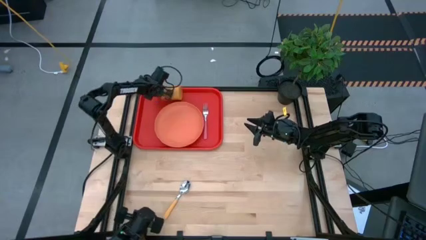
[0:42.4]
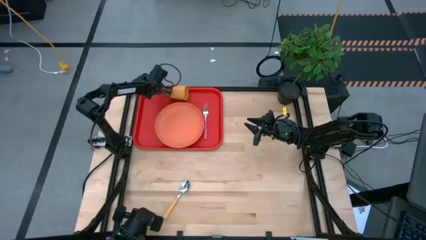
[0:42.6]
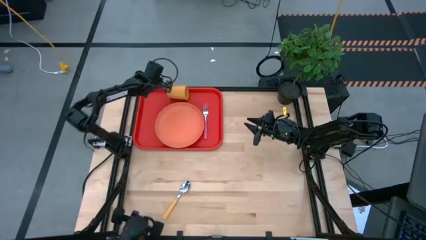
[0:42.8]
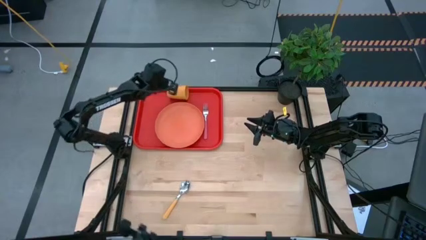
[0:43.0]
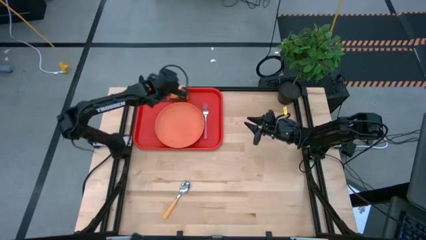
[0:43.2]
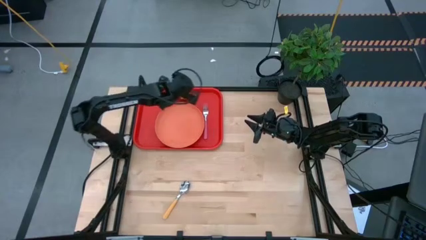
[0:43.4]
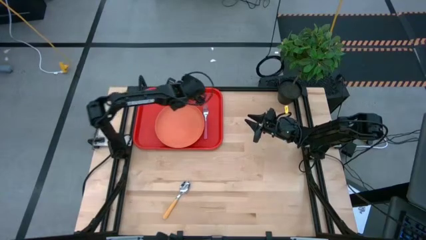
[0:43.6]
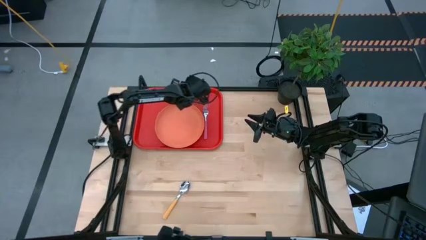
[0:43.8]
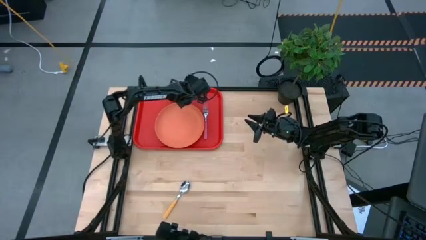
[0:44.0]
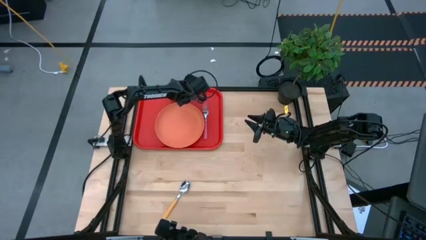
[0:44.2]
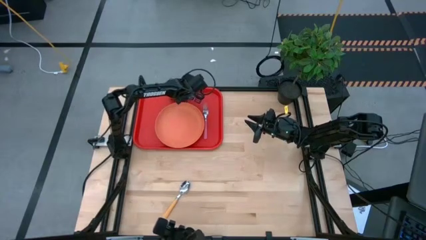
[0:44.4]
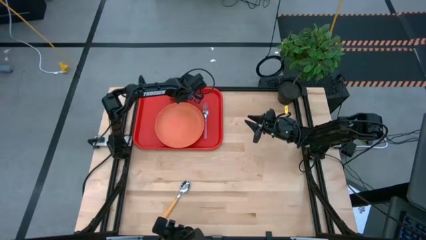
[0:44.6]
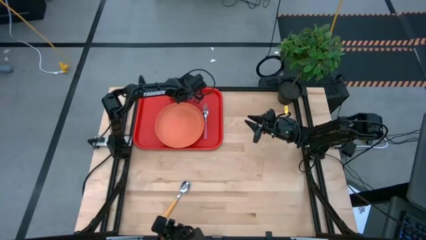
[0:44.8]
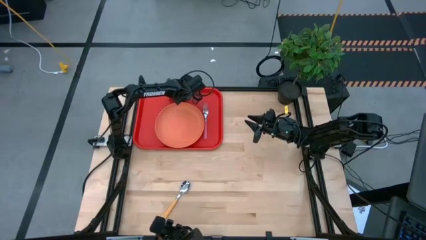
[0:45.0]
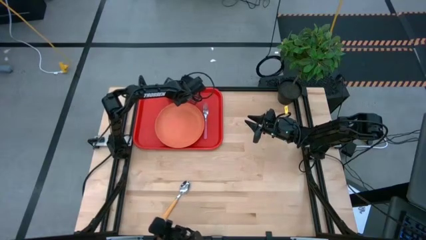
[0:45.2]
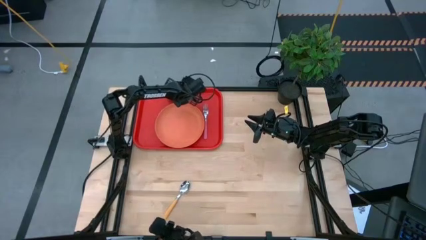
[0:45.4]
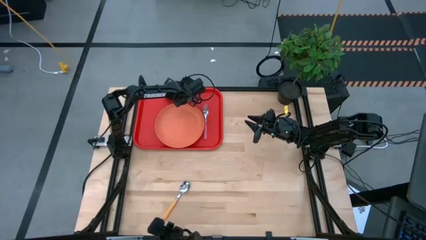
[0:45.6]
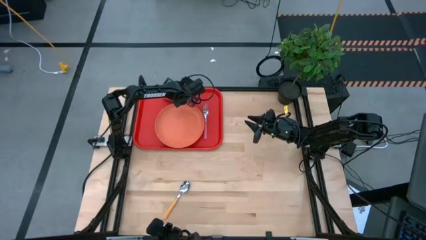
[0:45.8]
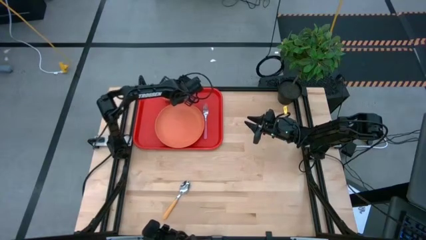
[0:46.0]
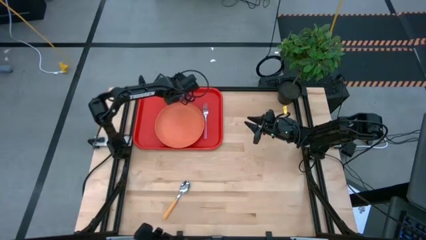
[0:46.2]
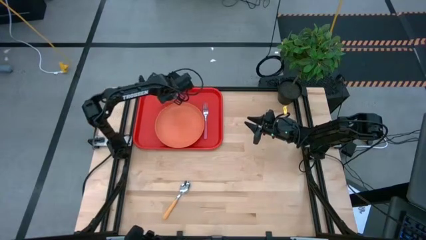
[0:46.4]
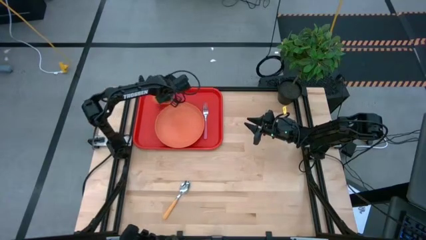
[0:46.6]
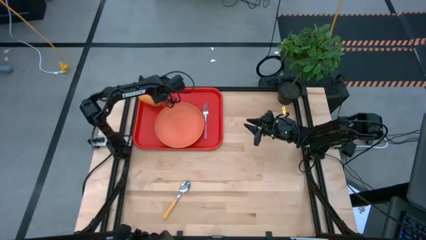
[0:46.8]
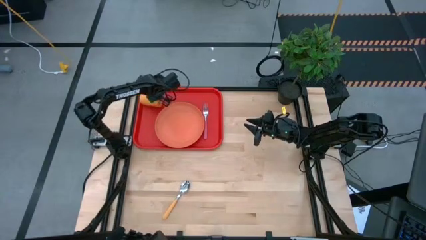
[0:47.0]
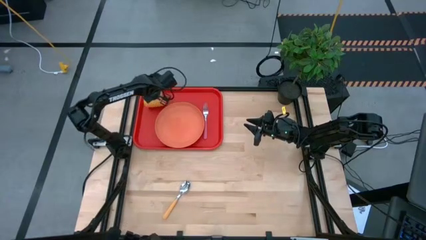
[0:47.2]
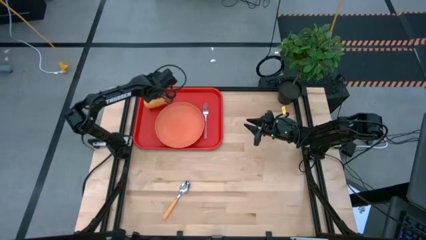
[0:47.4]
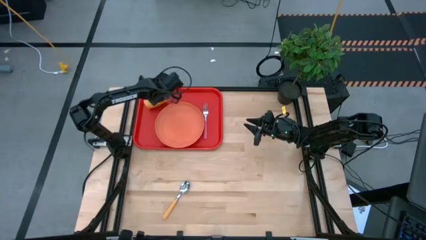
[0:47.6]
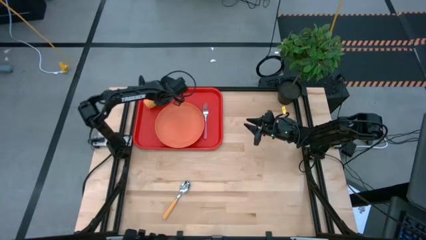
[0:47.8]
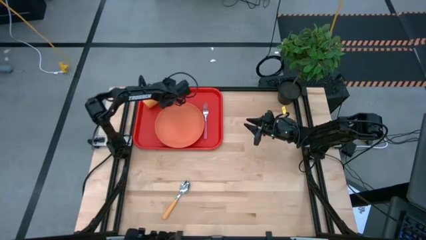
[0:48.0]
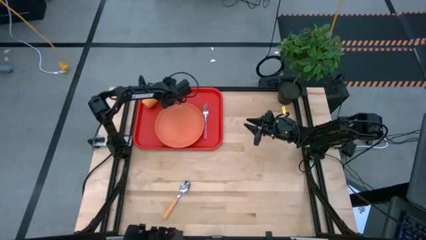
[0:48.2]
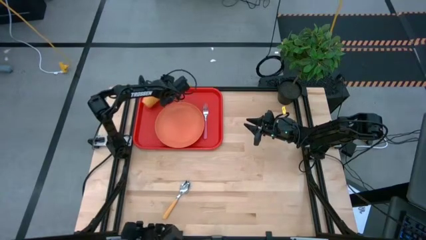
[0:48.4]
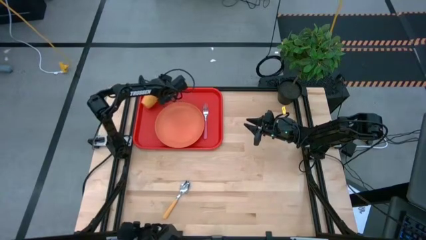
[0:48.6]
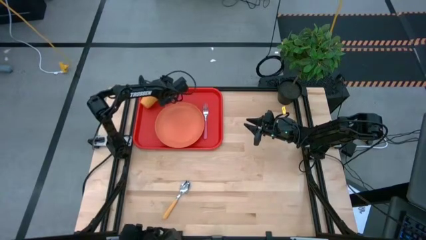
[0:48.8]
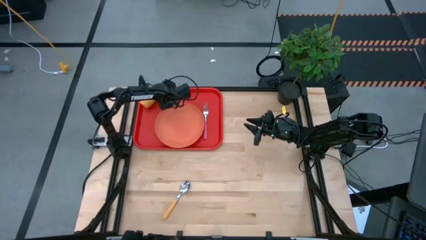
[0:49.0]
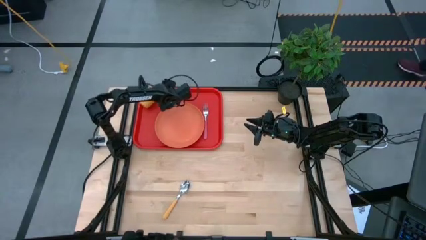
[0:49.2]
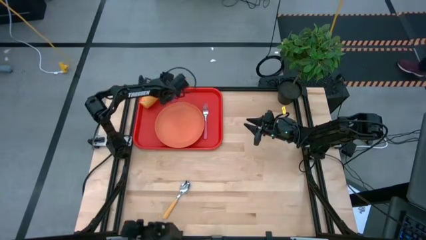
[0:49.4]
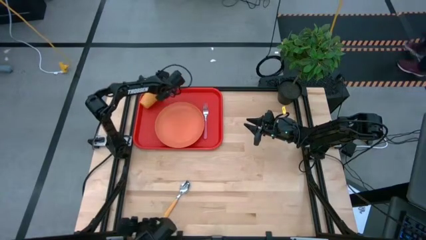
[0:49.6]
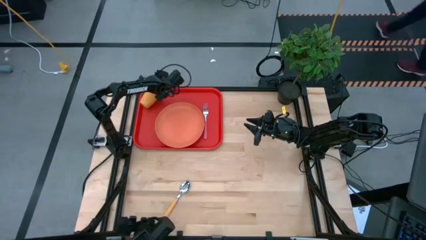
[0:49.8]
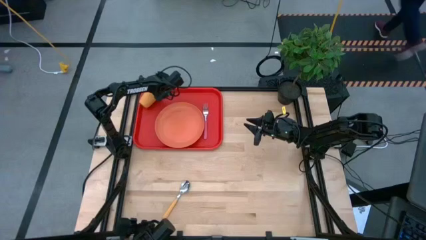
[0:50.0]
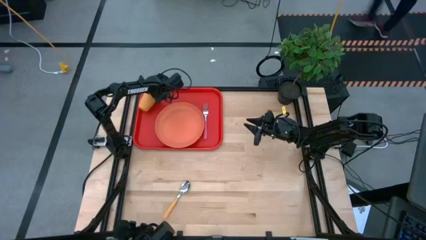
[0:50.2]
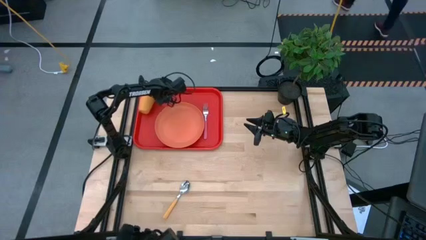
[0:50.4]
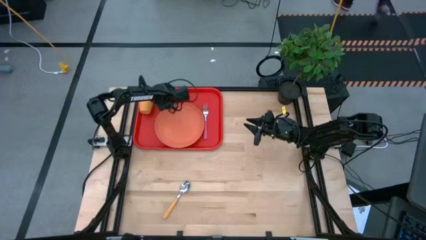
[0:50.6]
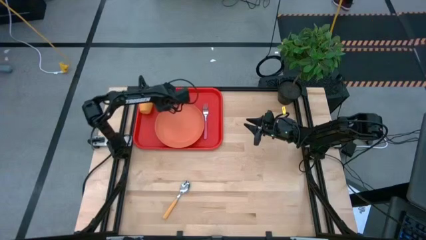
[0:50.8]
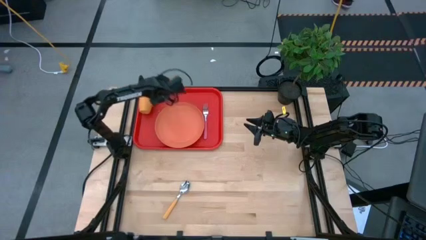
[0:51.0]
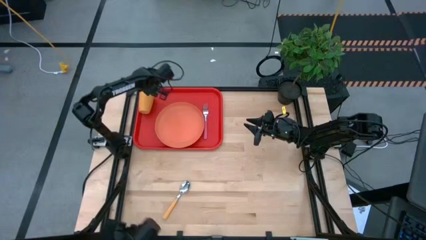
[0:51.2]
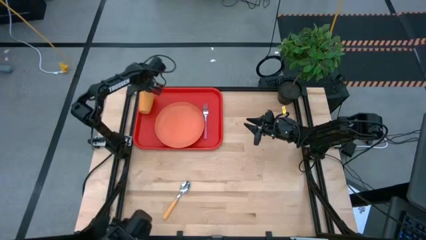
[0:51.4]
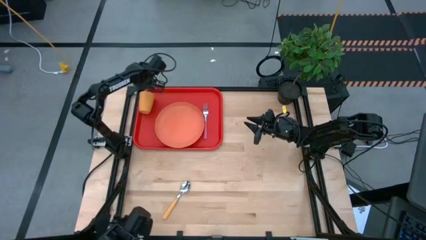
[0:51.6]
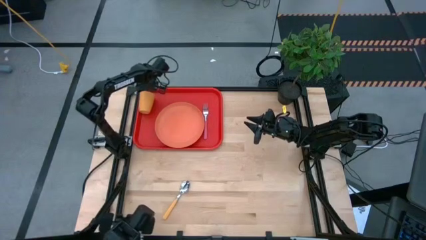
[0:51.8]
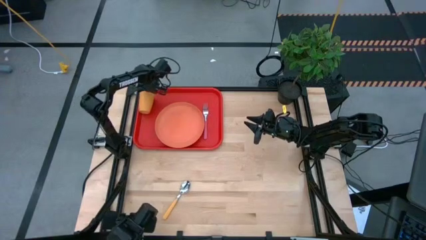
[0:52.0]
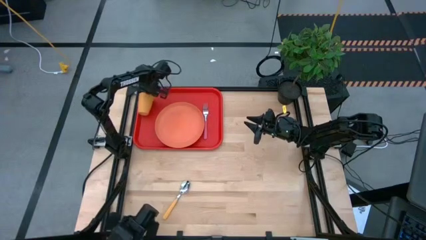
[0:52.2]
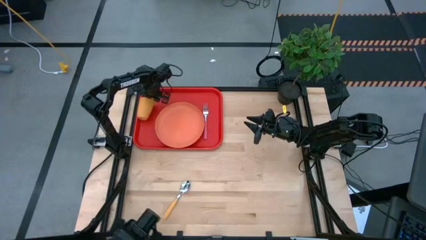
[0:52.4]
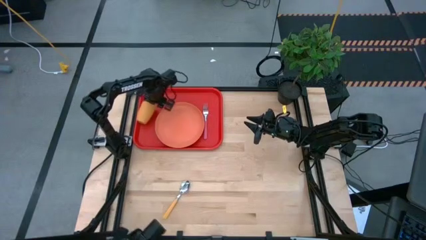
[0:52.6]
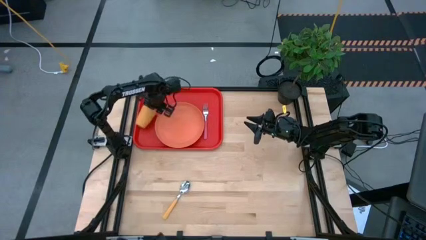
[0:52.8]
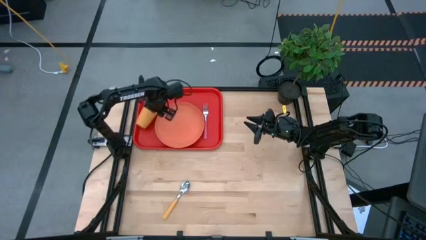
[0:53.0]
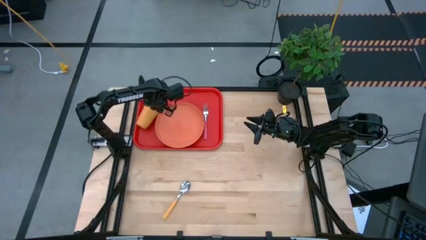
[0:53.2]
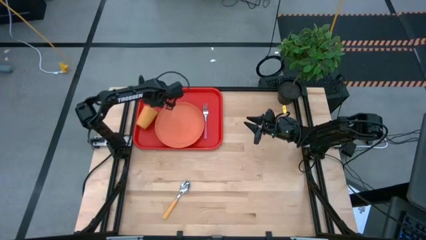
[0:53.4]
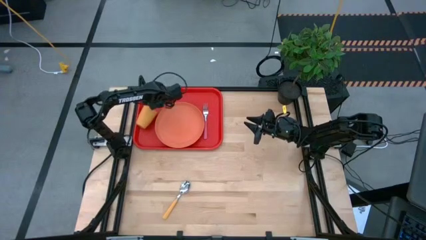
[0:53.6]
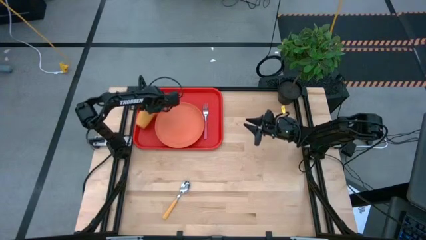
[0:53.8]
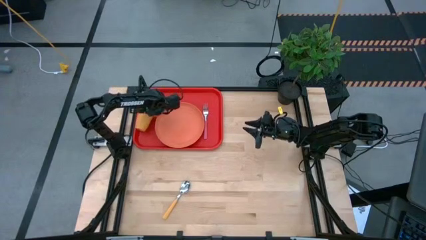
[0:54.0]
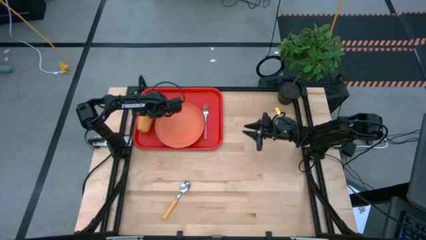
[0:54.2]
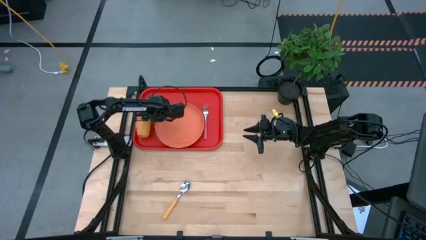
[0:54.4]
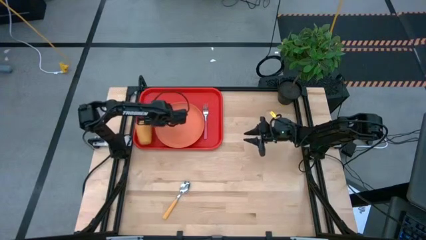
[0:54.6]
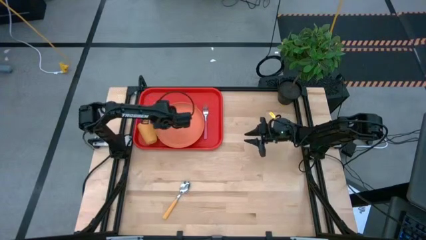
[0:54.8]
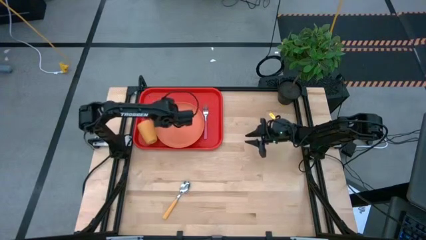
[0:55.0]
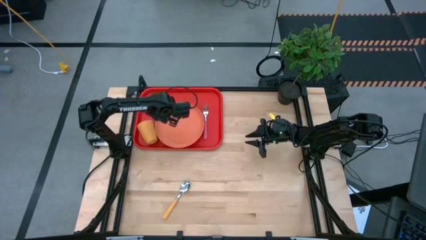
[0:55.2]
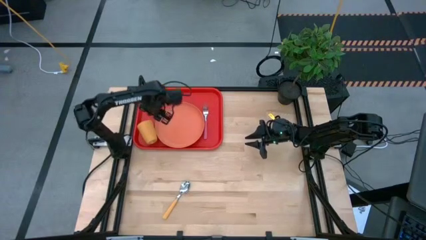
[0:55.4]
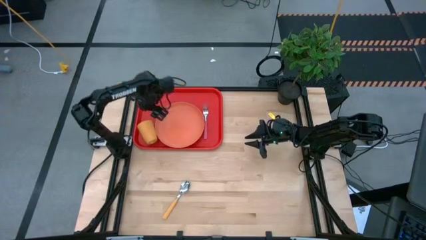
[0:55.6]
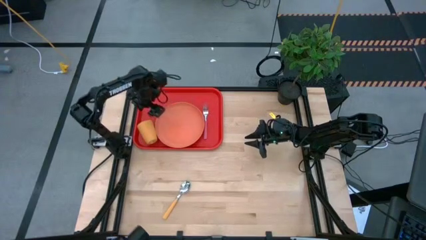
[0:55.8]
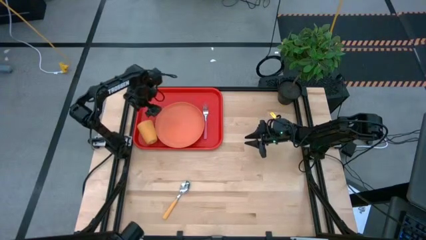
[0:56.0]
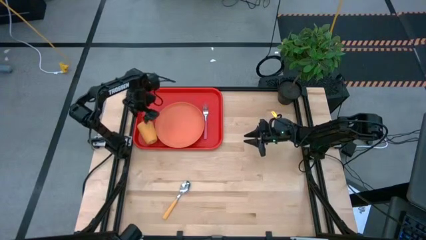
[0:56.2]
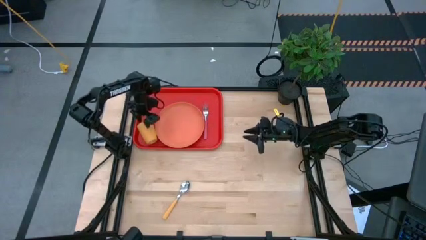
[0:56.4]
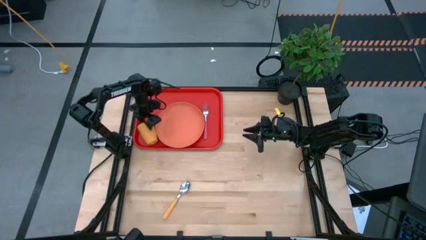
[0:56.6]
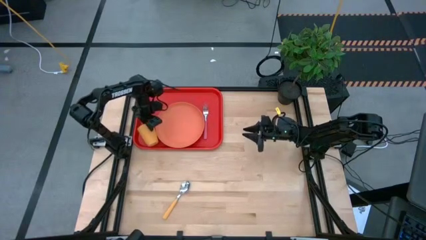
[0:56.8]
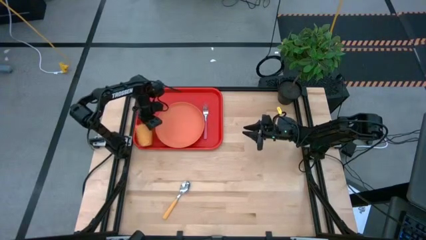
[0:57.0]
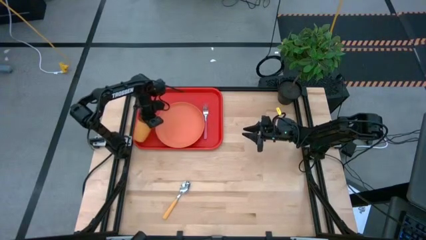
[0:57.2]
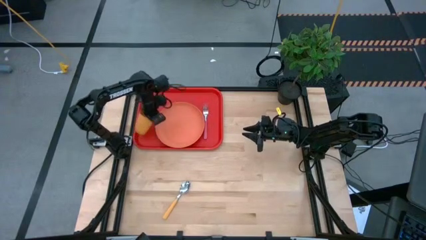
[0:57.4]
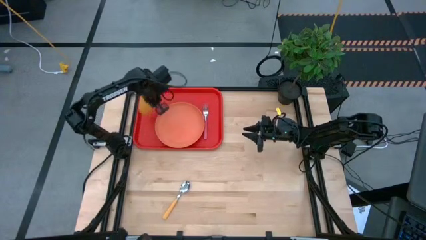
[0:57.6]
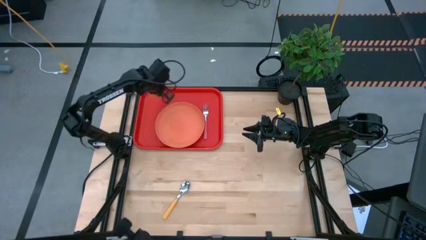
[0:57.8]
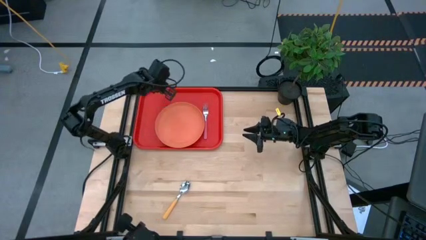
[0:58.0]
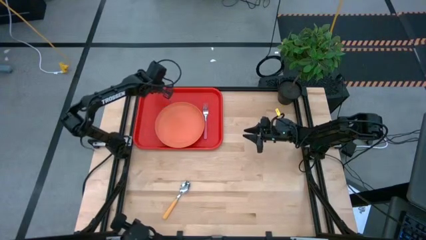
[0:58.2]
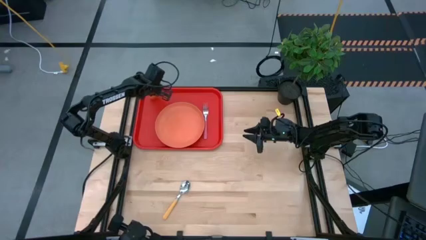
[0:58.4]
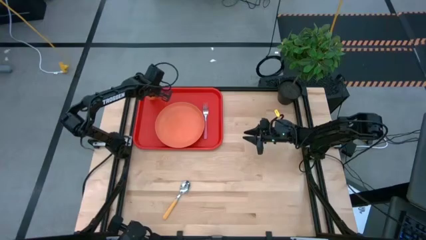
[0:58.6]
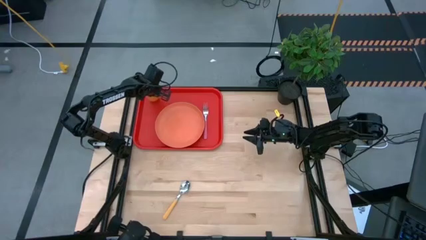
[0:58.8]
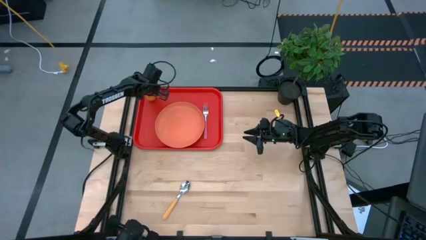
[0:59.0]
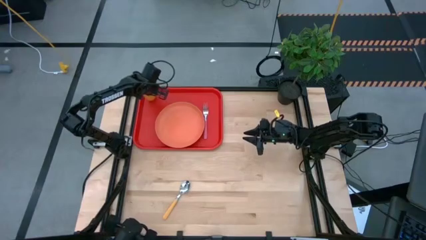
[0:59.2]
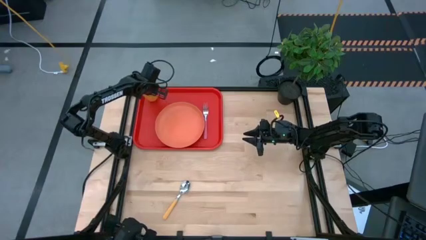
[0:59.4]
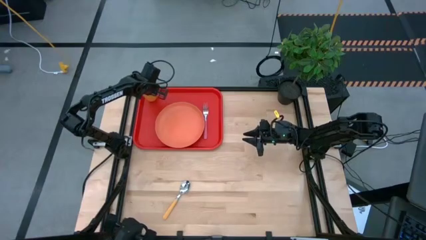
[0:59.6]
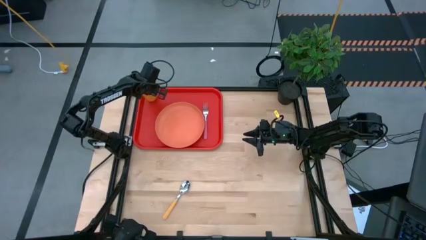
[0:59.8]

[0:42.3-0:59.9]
Task: Pick and place plate/cup/fork/spoon on tray
Adjust the yellow cup on the red serving tray
